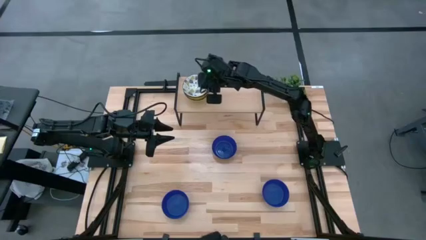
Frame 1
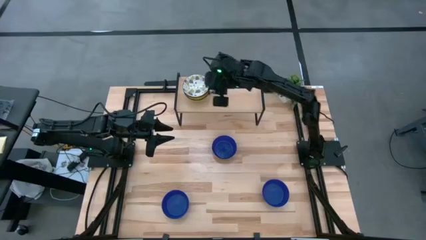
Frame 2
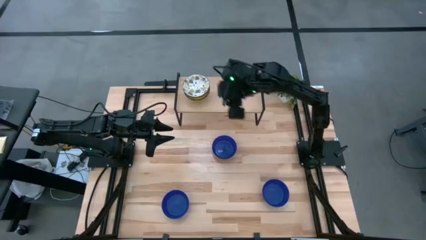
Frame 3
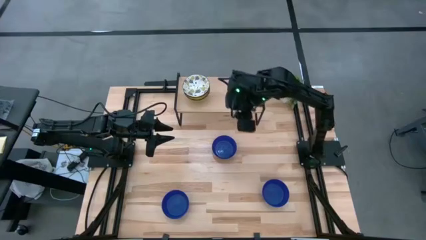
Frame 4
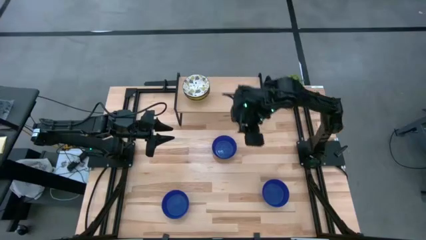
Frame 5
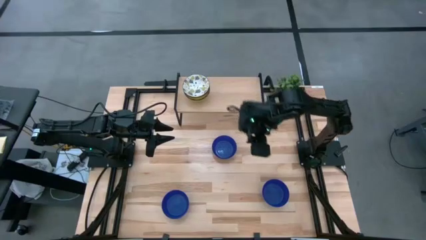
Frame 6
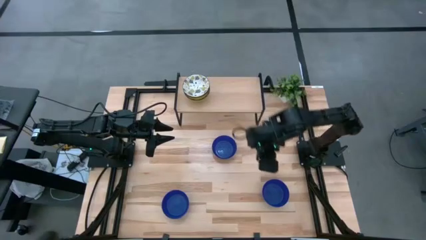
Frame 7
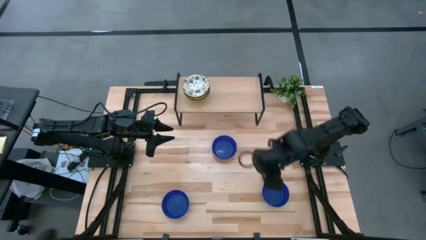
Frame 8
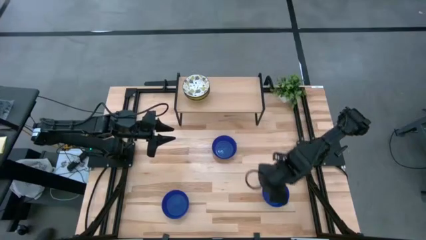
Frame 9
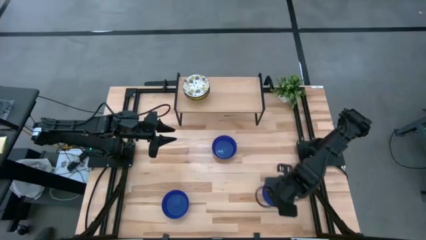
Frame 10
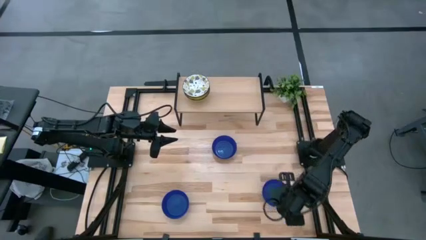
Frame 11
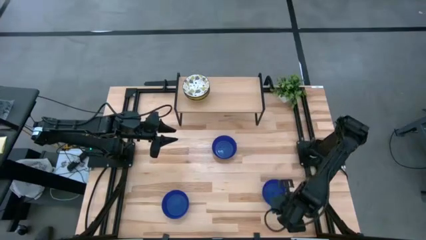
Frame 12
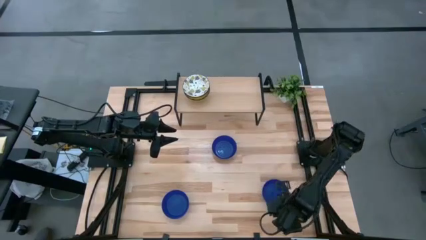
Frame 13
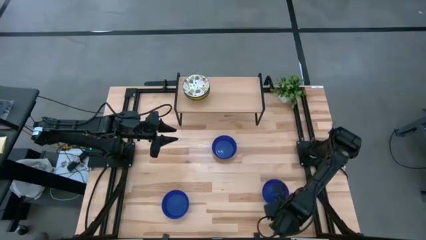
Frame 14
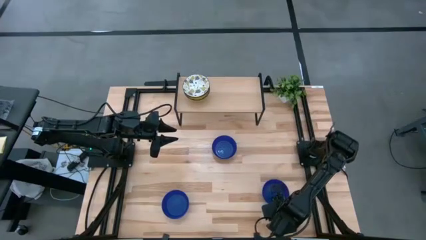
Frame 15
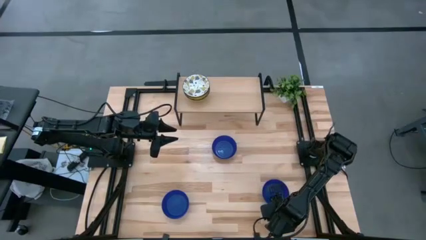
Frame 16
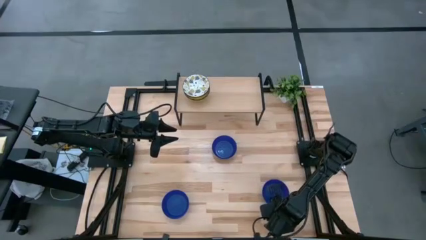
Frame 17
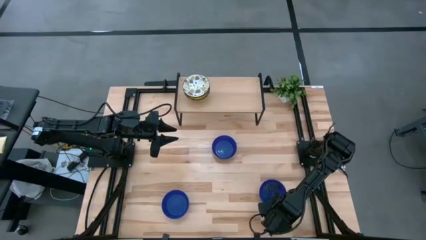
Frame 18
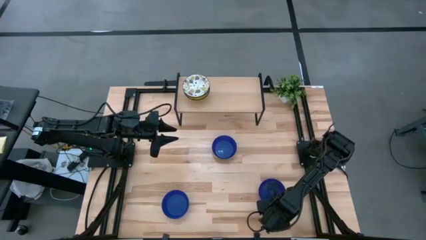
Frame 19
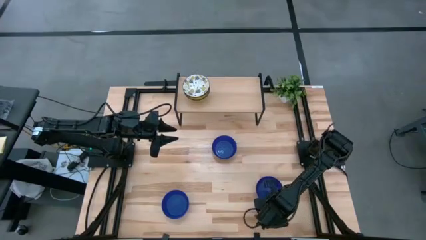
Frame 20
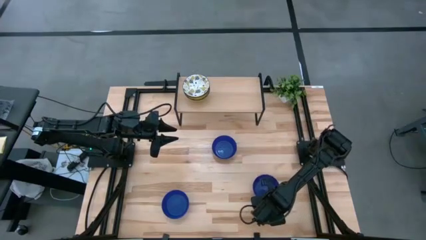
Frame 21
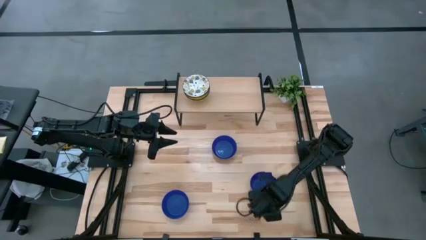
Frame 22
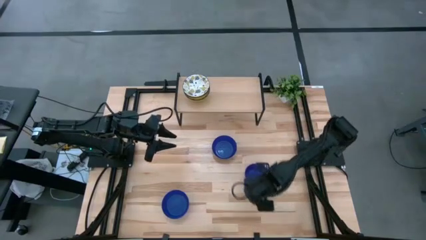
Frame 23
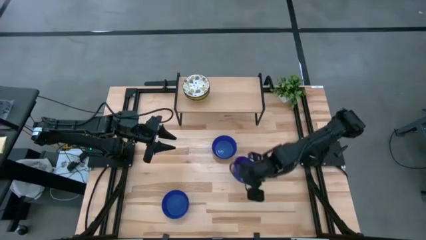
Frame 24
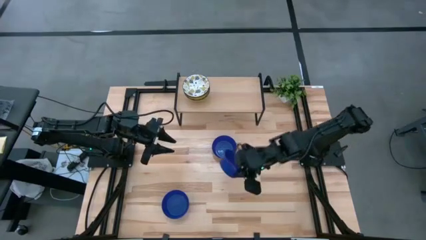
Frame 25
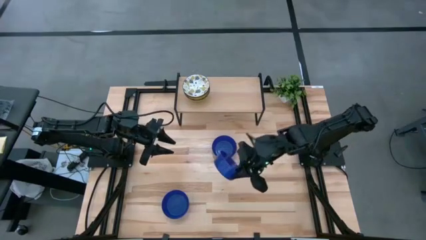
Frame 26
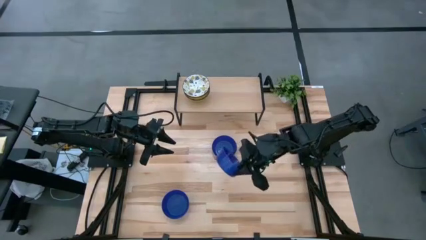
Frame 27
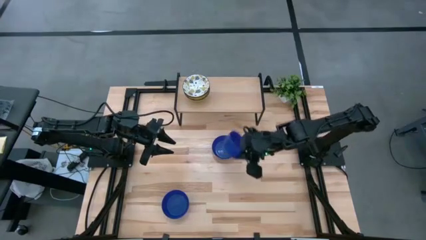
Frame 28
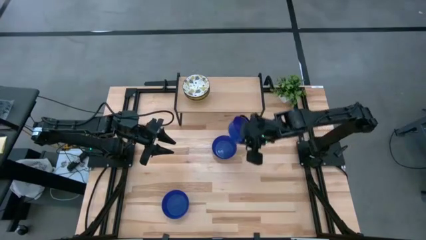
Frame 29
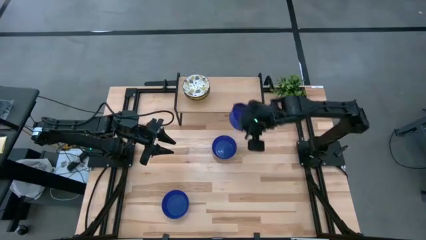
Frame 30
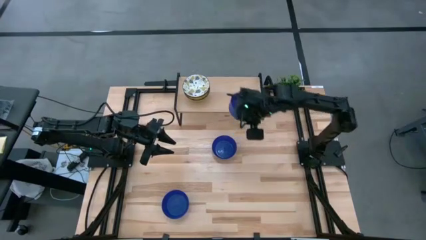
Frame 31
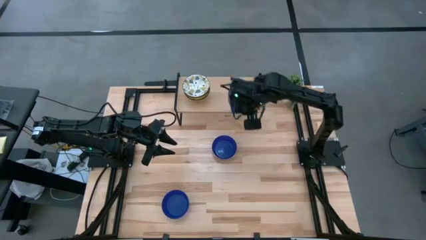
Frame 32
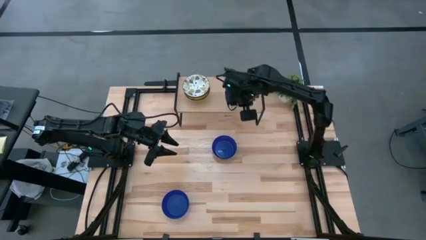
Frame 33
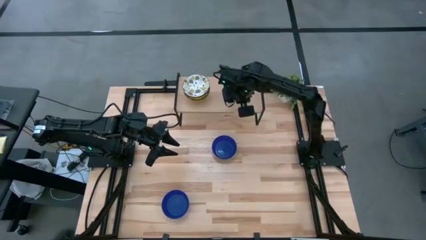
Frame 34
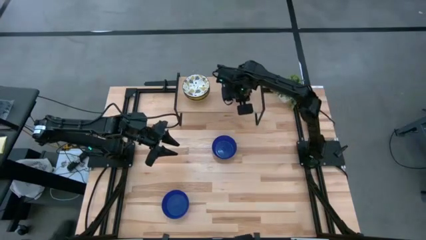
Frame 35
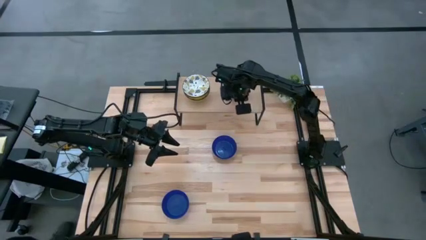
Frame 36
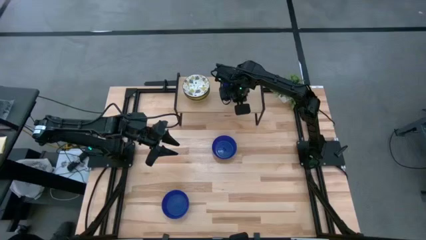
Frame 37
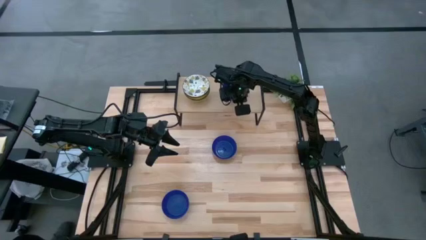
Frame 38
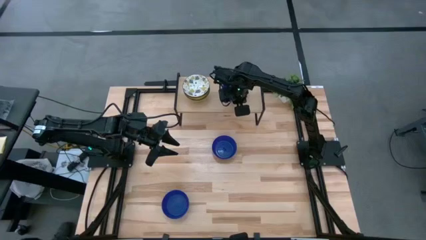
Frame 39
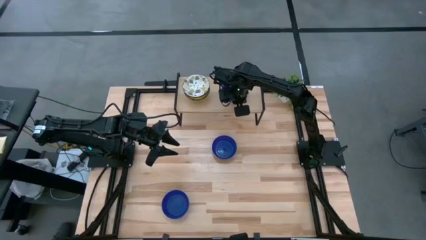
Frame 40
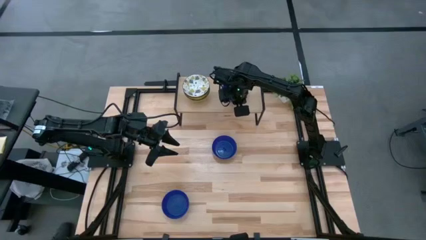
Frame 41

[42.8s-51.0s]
Task: Pick & Place Mini bowls
Put the bottom right blue bowl on the shelf

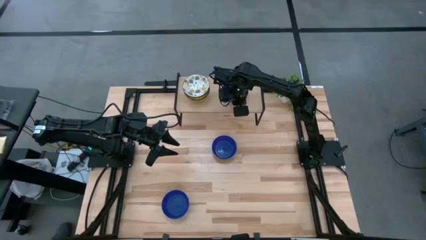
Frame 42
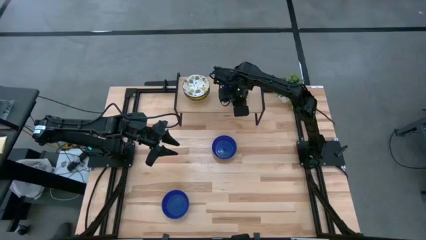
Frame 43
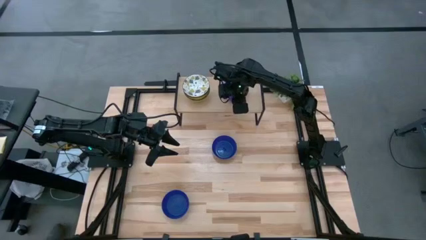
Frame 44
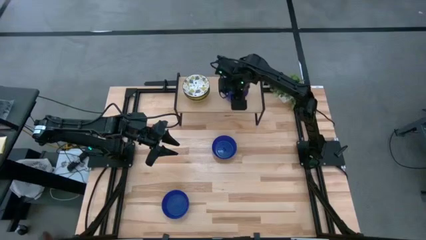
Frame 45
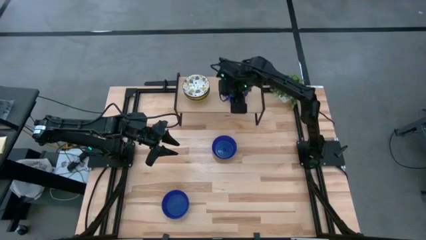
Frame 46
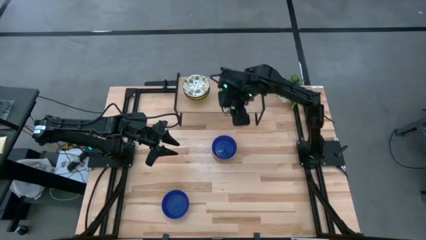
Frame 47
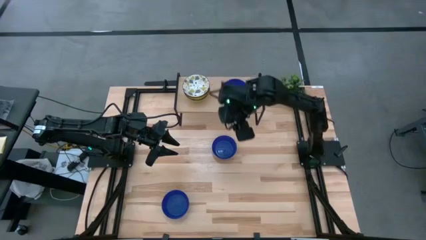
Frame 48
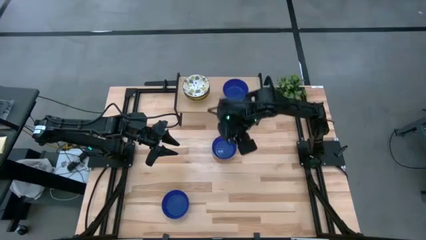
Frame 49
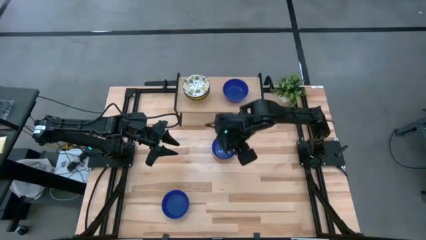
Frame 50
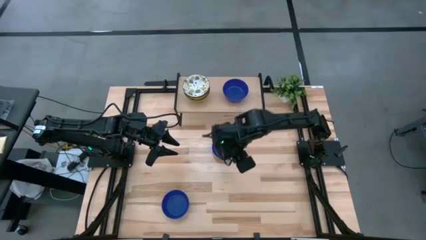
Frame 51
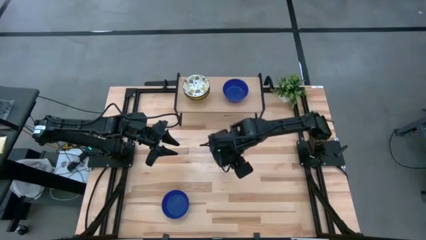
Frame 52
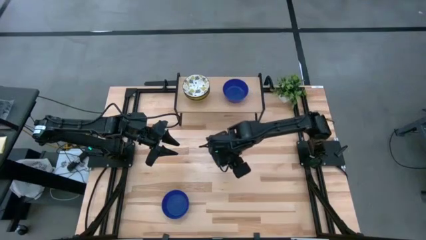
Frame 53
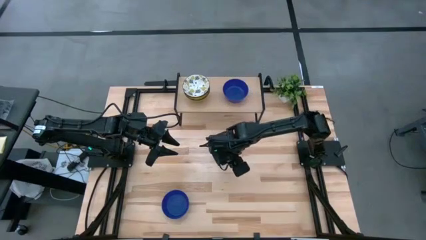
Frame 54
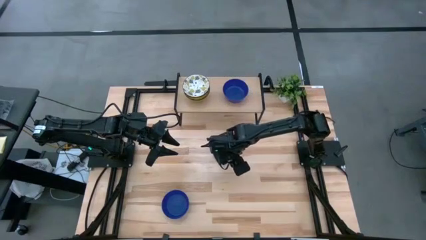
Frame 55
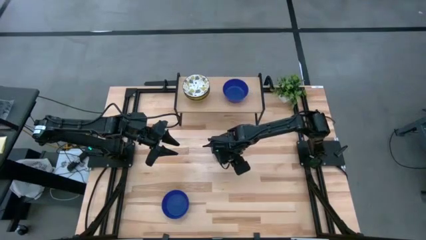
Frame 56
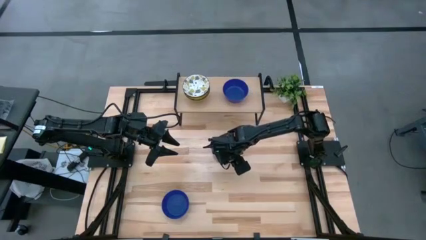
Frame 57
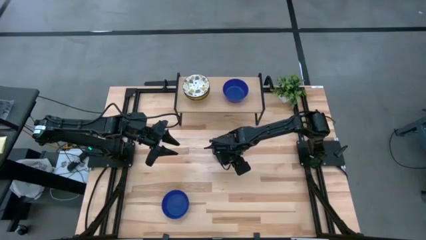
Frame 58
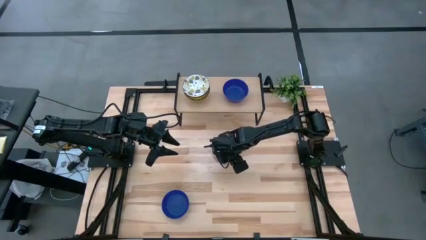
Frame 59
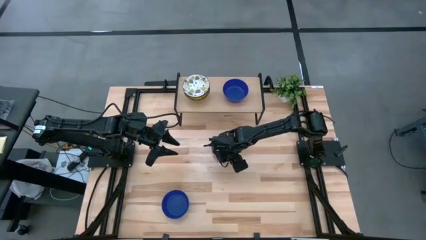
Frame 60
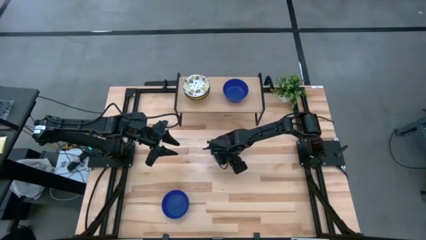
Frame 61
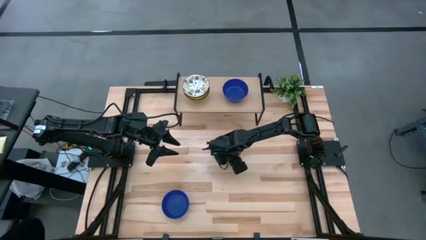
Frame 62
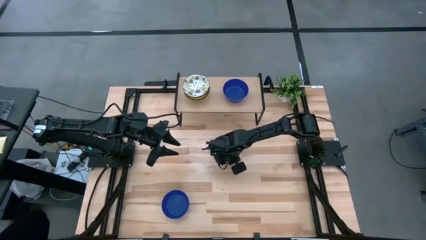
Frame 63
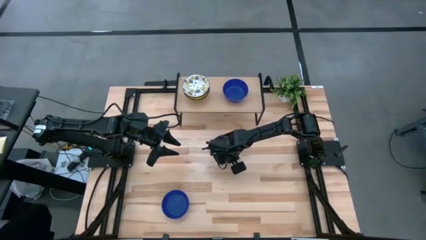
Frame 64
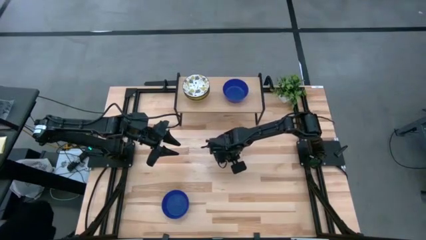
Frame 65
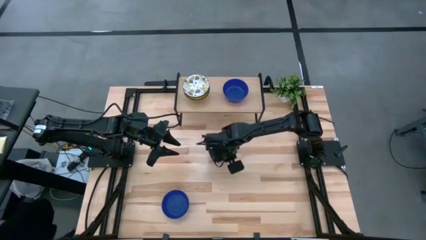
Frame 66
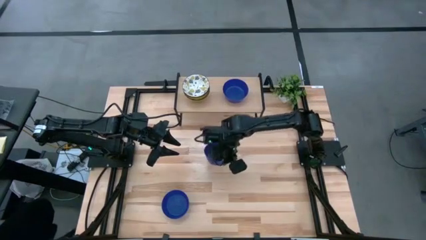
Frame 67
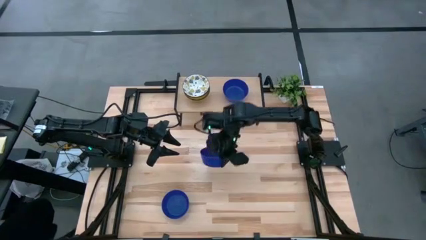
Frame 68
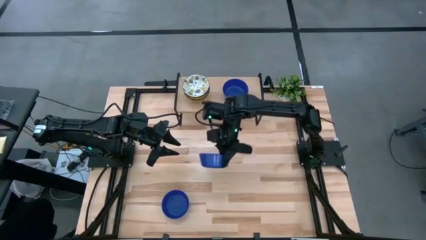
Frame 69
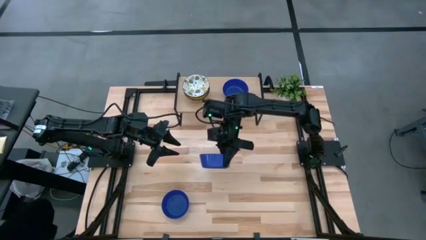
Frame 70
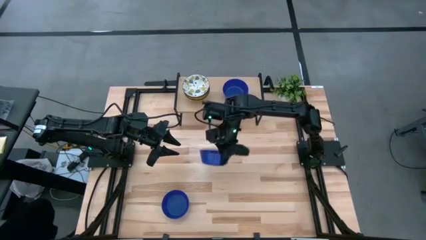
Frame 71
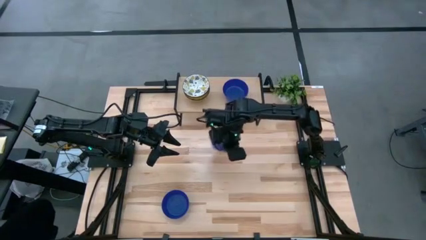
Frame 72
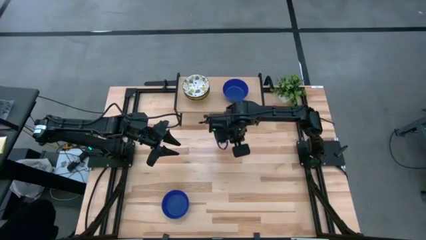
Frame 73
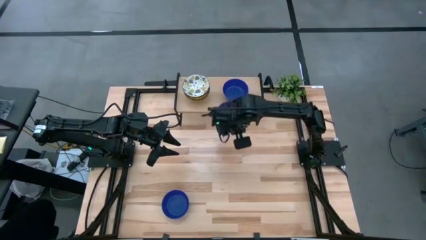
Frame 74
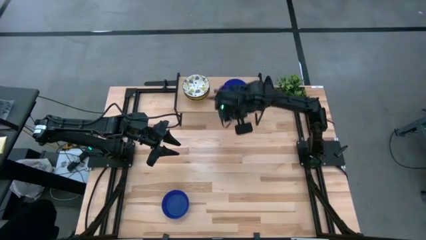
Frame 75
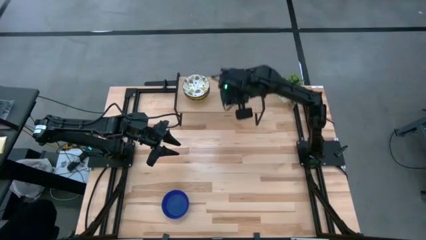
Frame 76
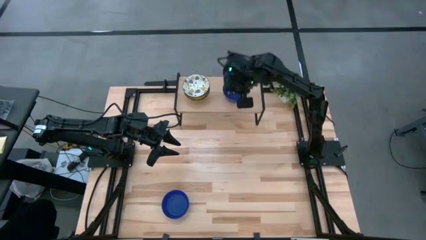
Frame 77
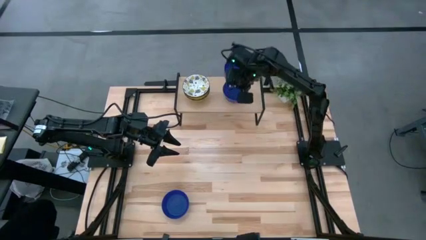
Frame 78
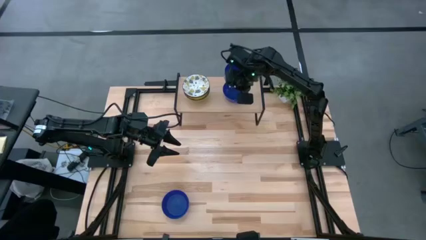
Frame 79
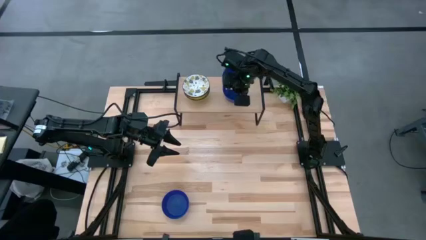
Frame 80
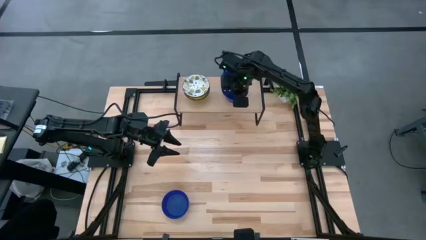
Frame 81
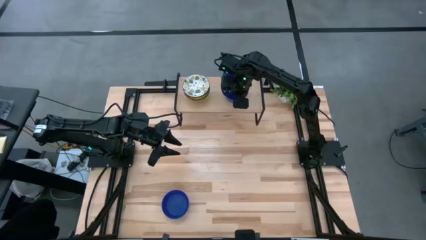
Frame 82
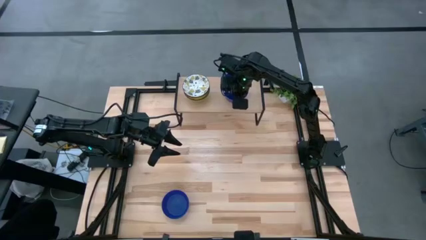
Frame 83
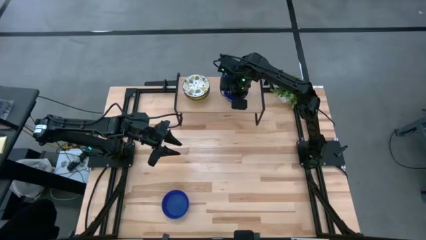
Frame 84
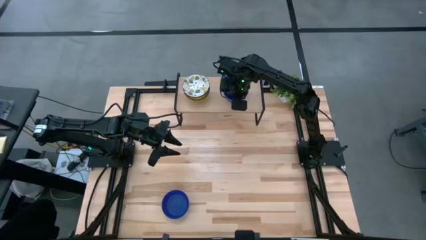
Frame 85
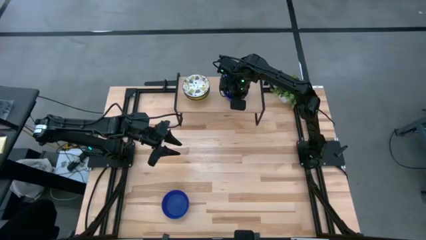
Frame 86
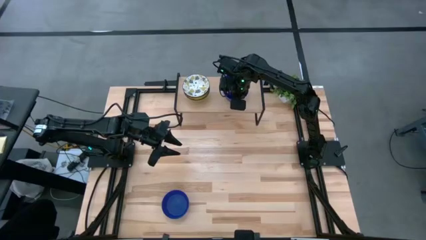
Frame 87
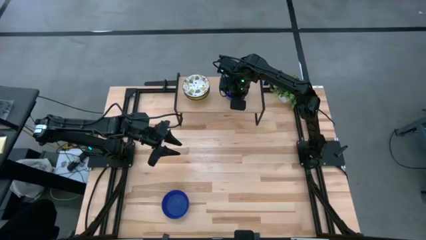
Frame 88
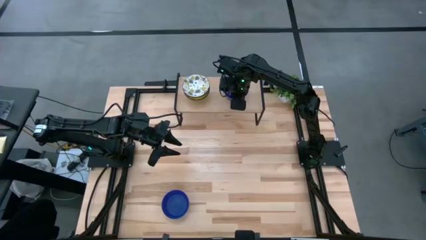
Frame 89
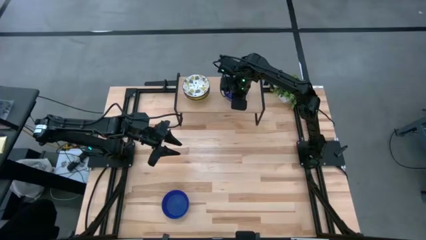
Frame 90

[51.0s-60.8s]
Stack the top blue bowl on top of the blue bowl on the shelf
